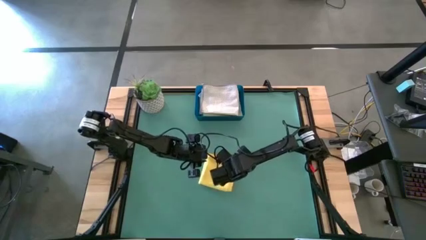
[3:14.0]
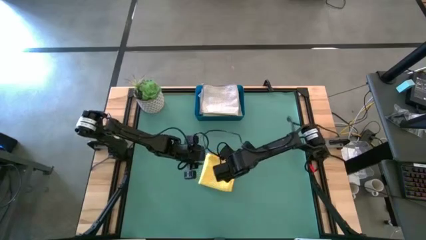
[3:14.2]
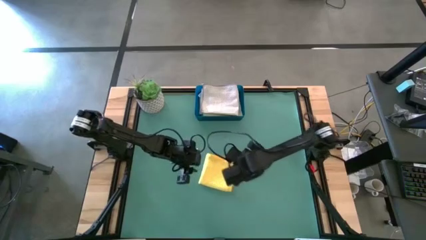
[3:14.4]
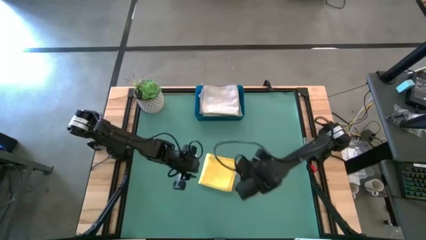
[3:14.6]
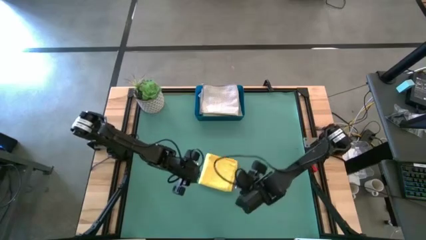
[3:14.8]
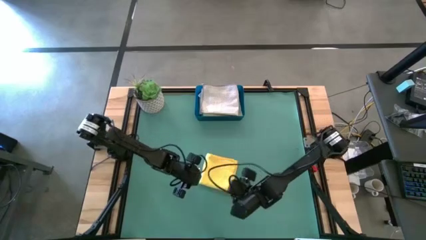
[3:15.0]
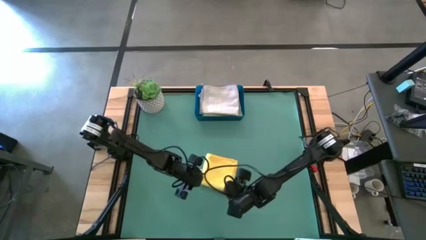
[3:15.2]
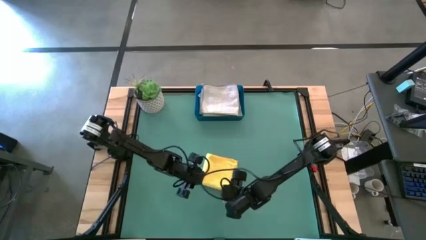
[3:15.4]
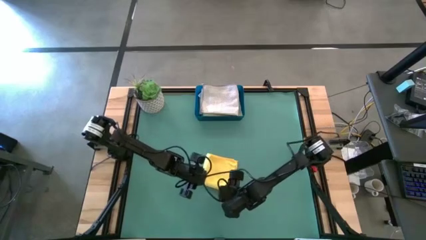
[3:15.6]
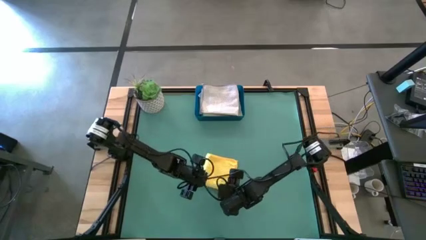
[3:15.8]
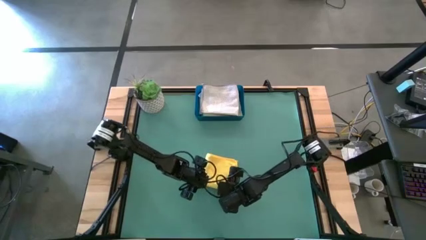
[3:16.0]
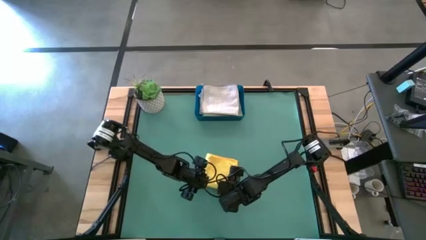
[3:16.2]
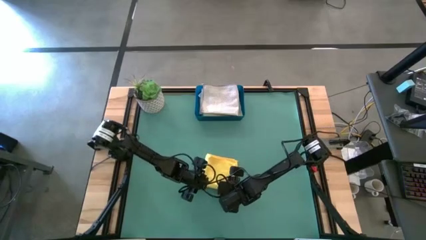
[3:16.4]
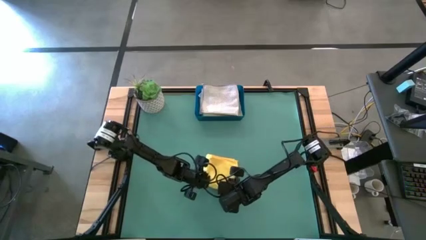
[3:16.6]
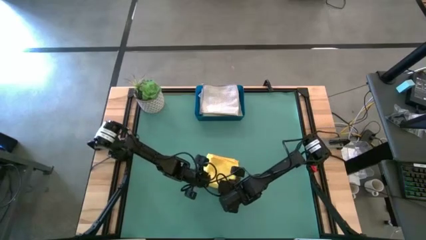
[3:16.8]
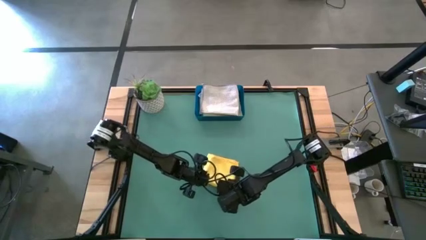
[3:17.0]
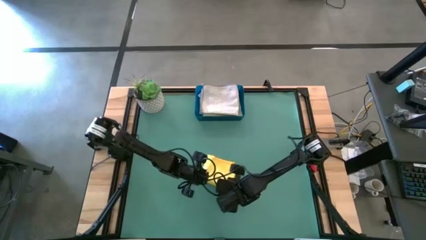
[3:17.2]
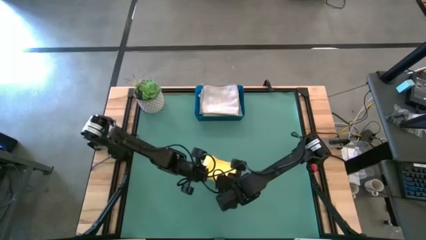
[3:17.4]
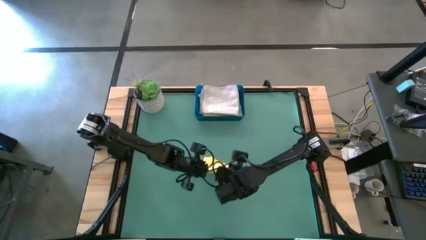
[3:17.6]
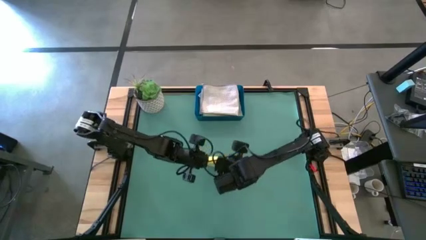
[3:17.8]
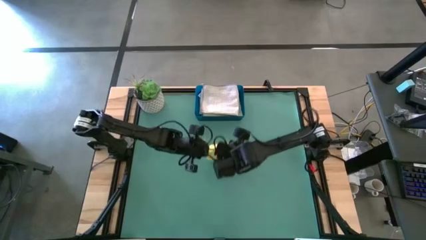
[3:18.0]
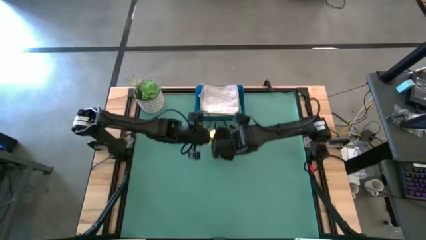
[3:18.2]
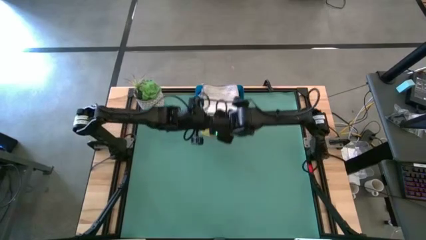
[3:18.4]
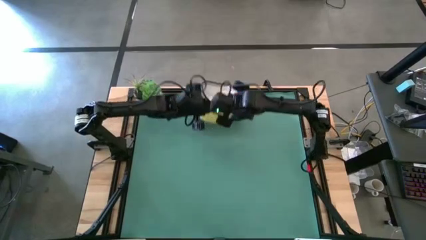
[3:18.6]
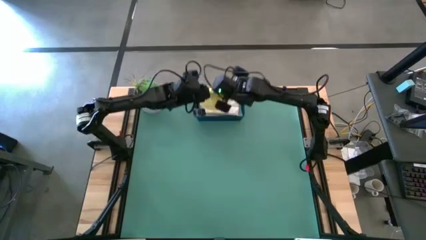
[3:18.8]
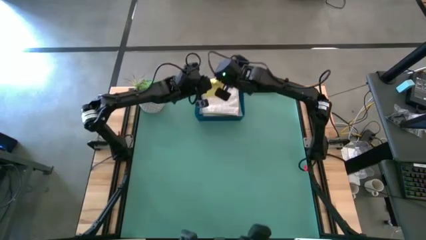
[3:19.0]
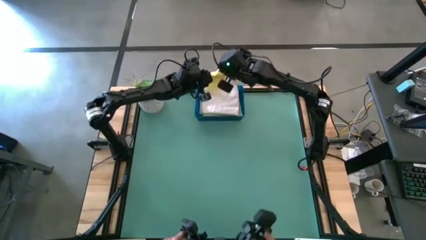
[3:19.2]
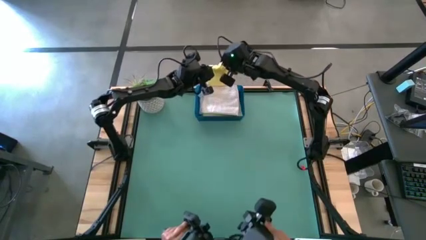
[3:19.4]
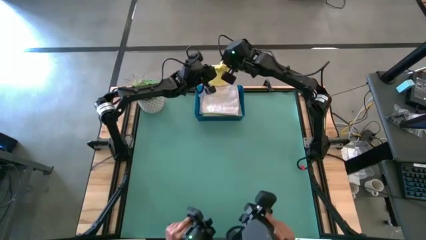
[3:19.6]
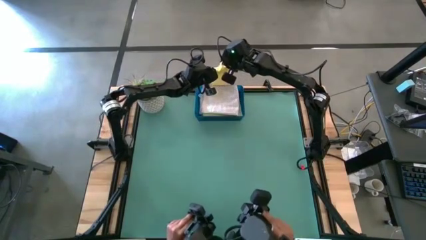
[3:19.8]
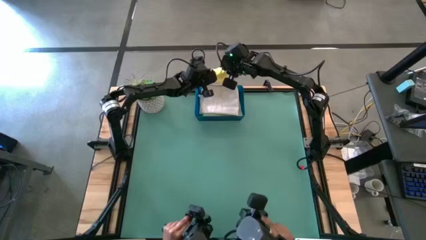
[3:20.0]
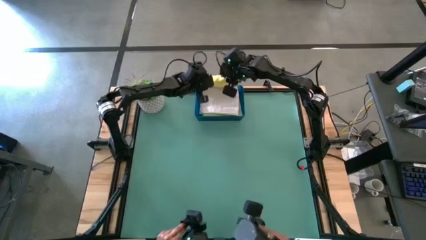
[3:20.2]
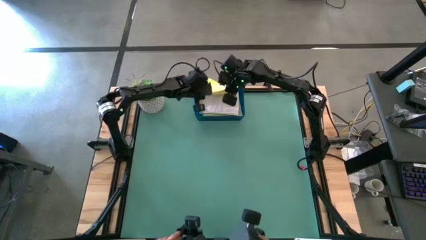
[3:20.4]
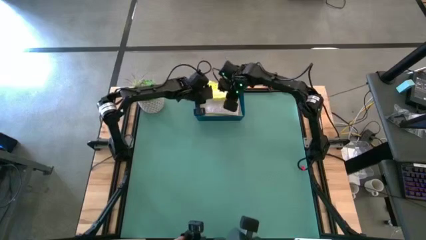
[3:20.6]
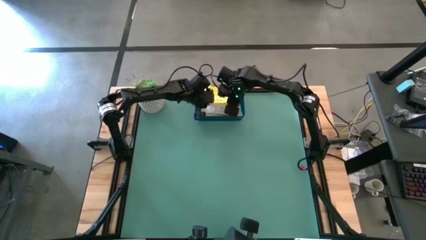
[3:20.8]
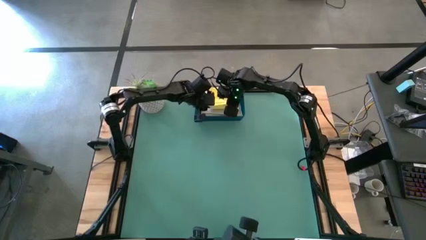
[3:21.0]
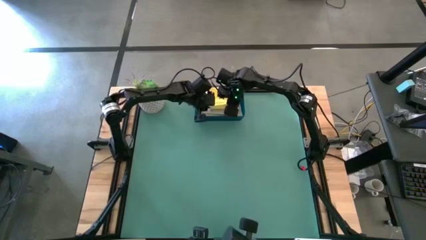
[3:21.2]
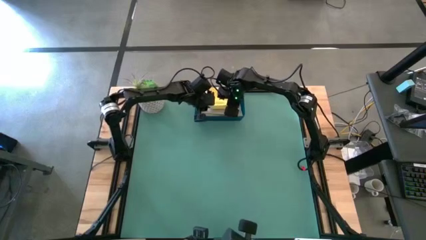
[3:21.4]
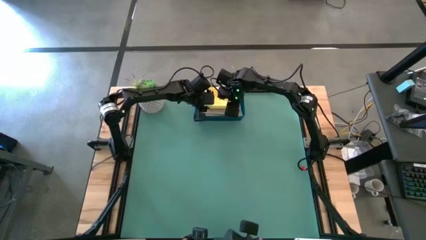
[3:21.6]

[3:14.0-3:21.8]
Task: Fold microfiber towels
Put the folded yellow microfiber towel into the blue bin

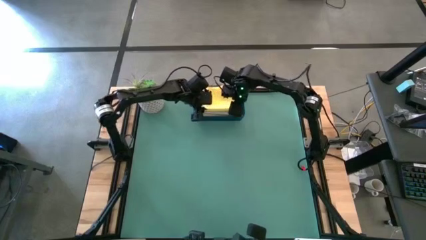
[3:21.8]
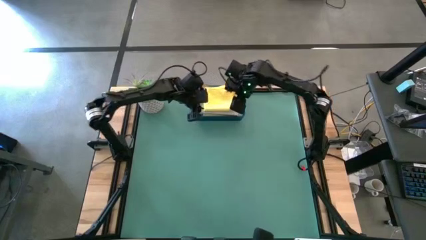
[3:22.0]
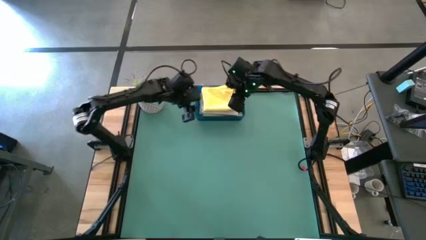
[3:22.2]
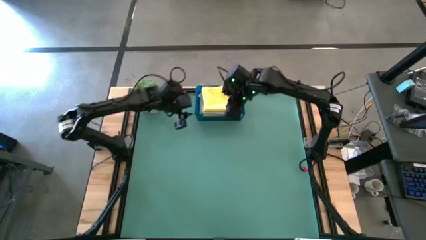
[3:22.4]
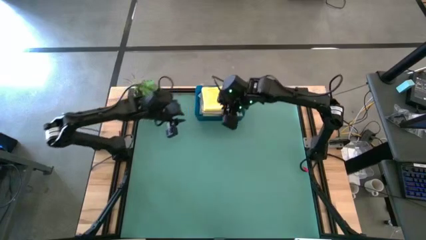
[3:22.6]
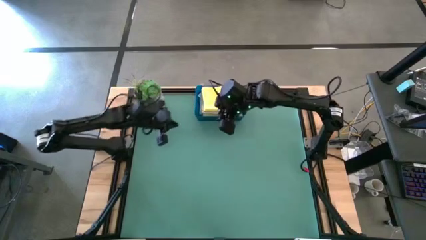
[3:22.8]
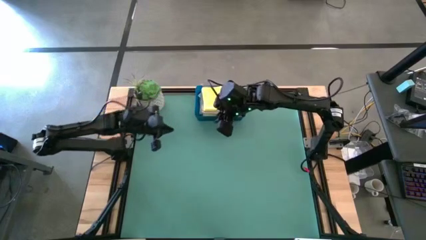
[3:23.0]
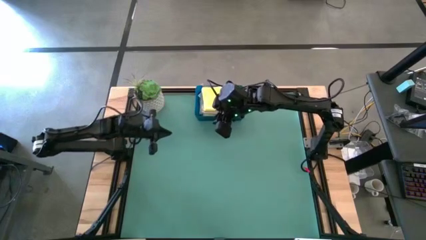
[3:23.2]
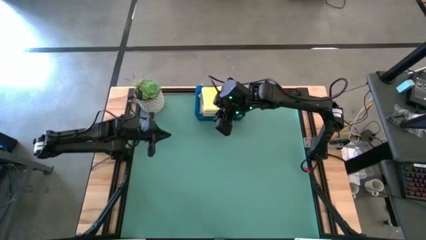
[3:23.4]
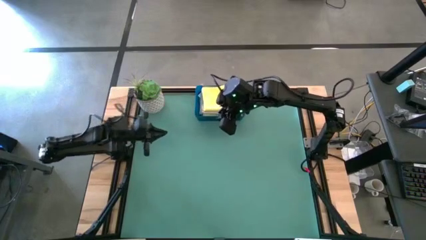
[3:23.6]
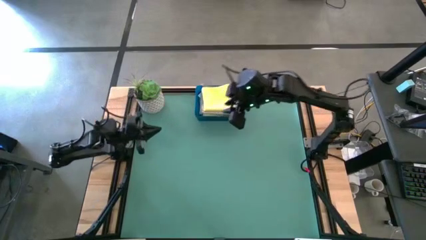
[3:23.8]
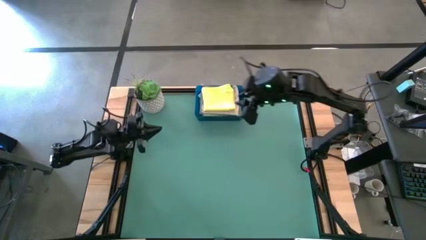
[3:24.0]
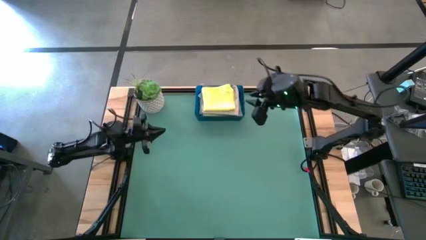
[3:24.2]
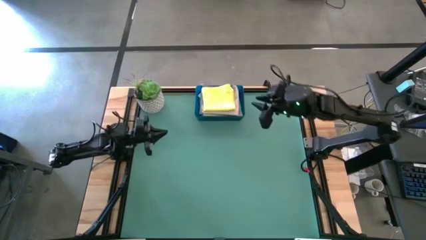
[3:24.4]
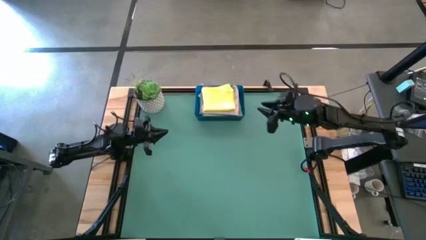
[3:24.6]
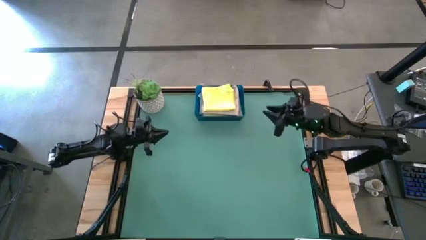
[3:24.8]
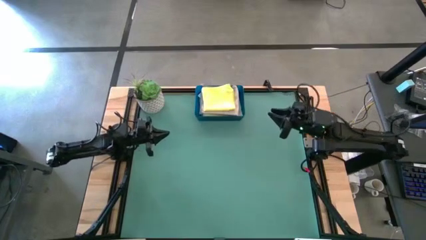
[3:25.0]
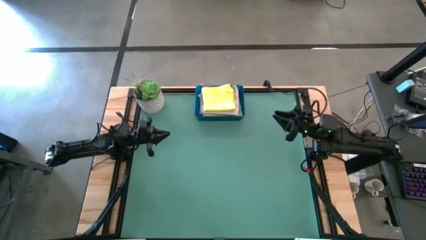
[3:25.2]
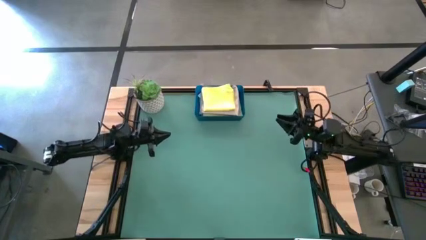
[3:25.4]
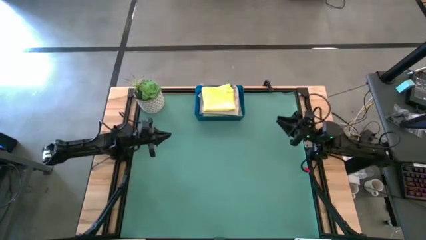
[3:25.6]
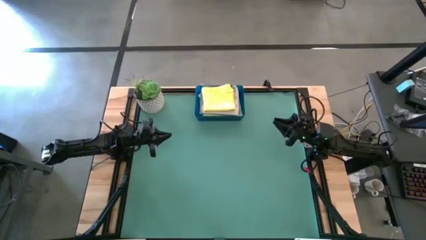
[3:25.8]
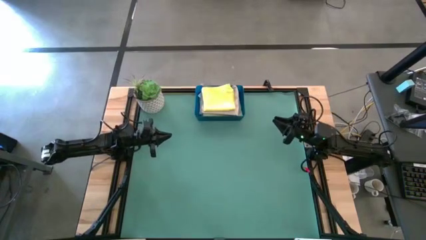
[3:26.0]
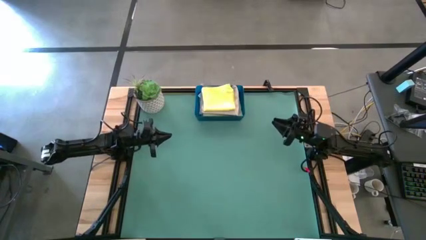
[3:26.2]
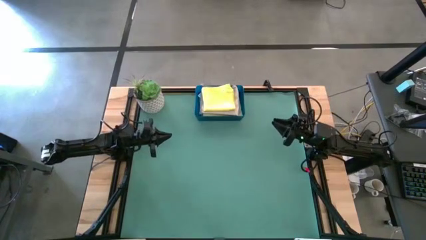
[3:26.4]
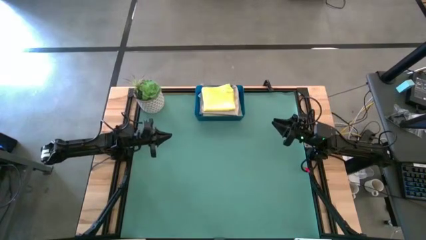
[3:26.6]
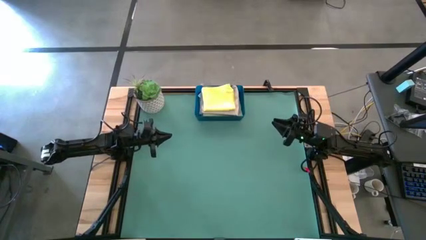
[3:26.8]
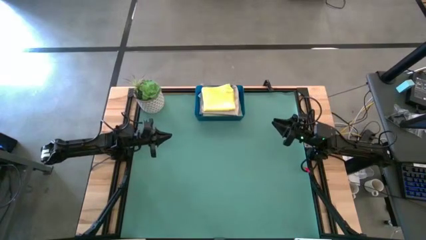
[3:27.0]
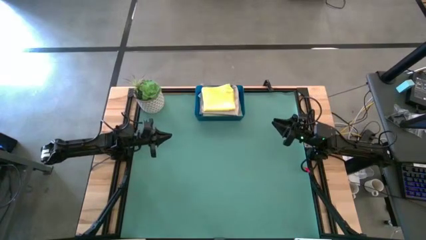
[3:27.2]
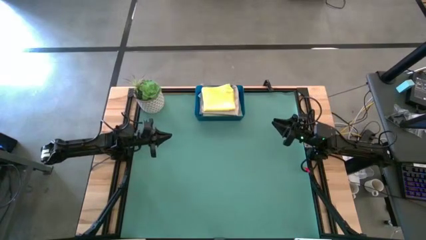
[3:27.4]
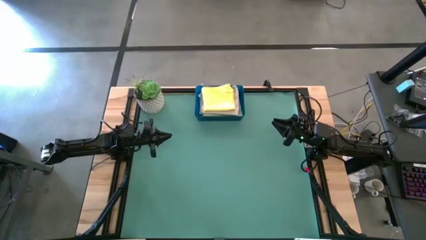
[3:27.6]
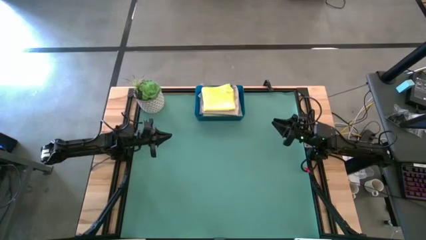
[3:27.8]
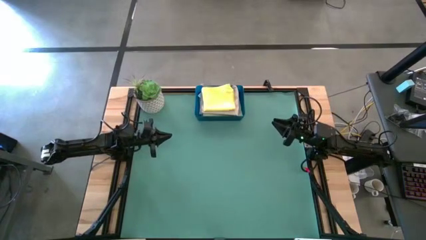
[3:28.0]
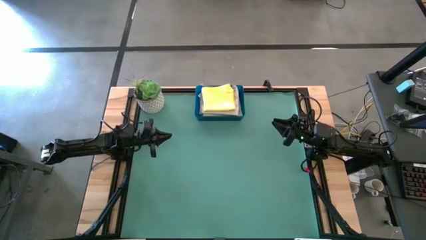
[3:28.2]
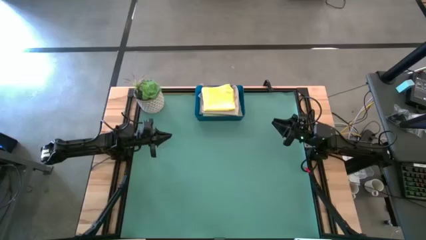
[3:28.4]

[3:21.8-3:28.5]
Return to Home Position

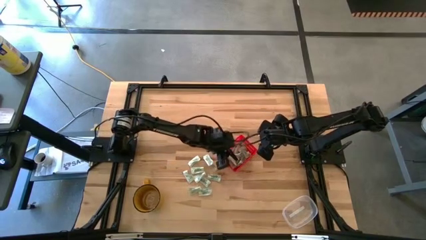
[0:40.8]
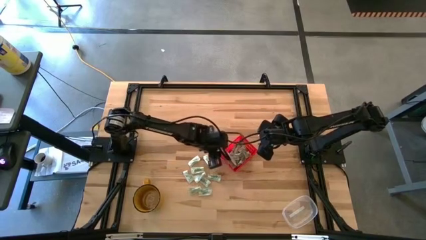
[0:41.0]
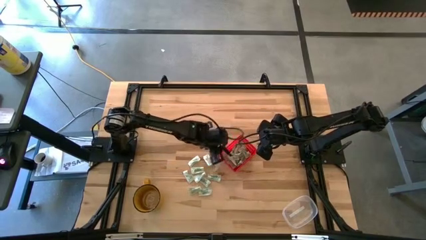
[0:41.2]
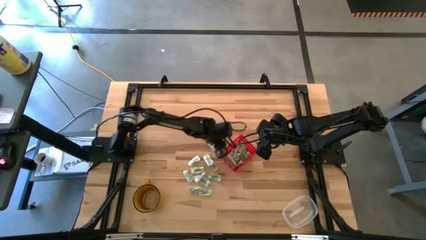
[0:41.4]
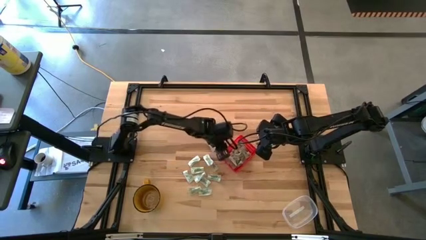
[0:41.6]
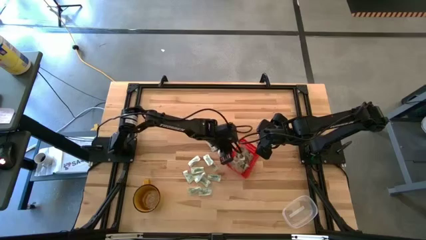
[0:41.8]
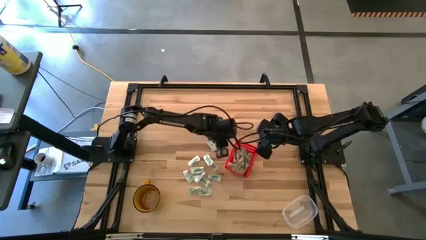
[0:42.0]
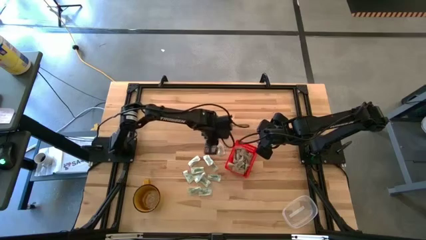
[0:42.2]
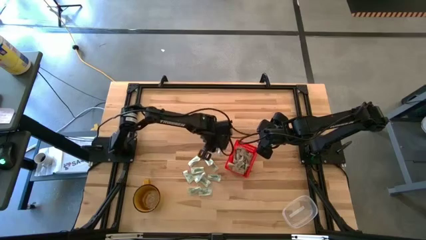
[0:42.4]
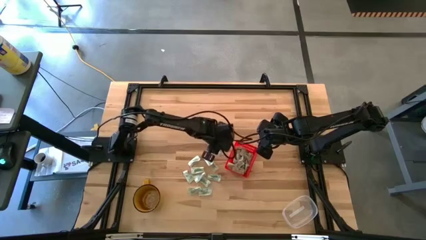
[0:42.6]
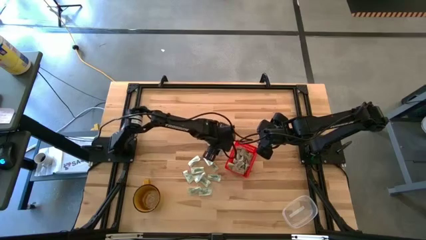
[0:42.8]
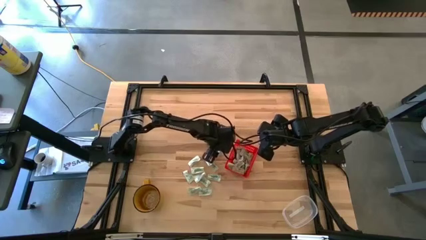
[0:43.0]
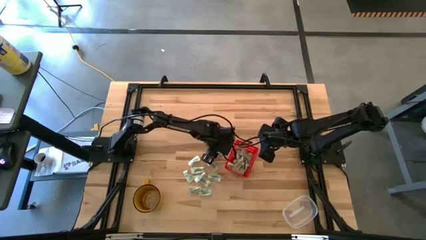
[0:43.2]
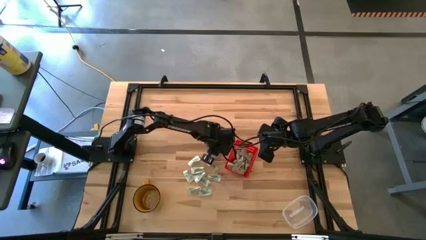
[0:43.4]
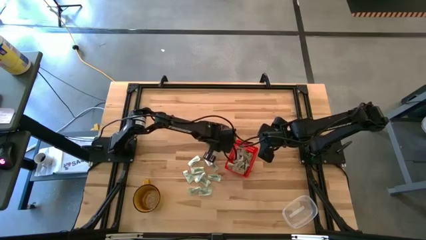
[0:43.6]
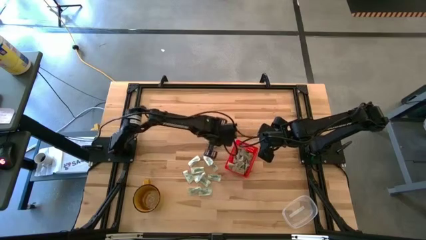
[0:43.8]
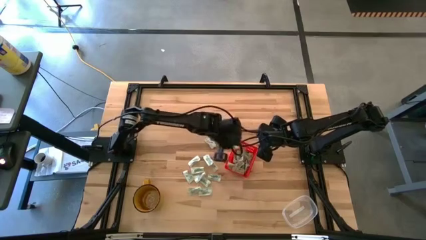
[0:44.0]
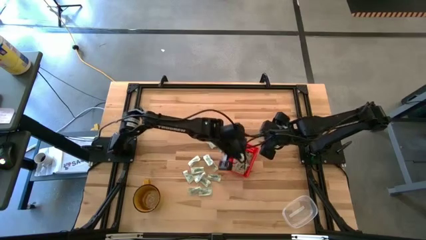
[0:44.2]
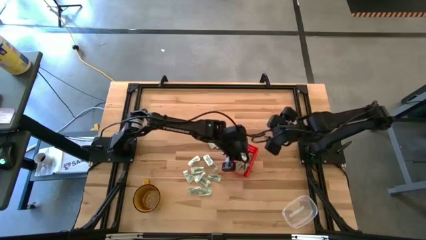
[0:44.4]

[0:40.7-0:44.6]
Task: Pick and place items into bin
Put the light green stevia packet into the red bin
